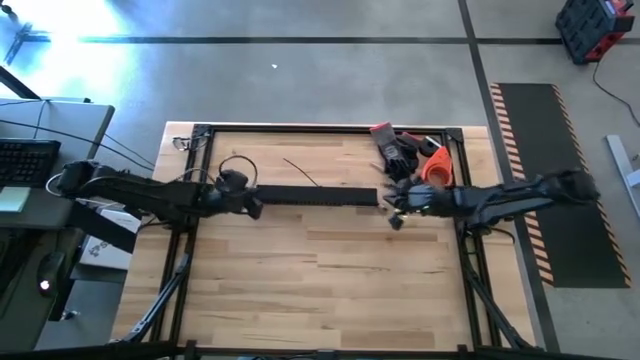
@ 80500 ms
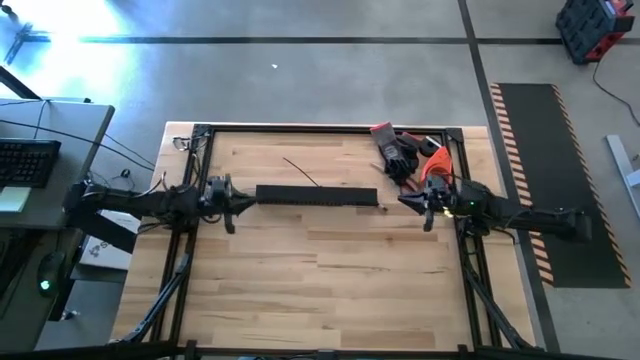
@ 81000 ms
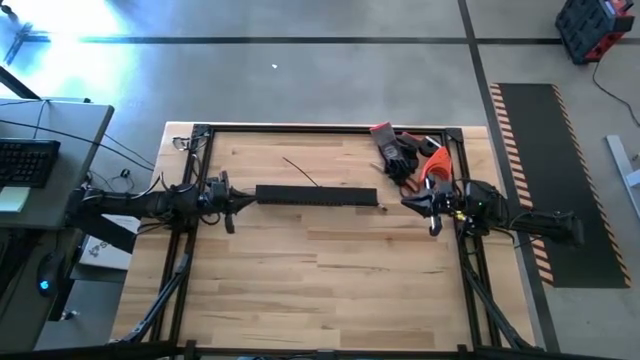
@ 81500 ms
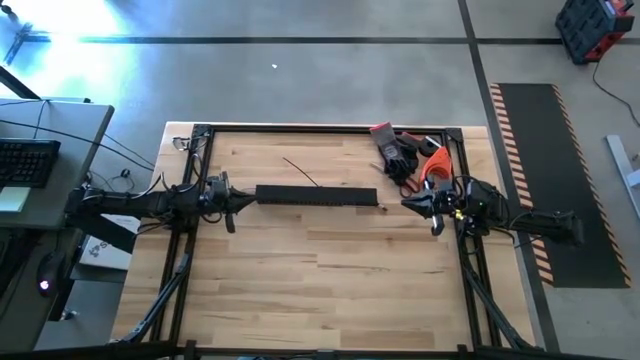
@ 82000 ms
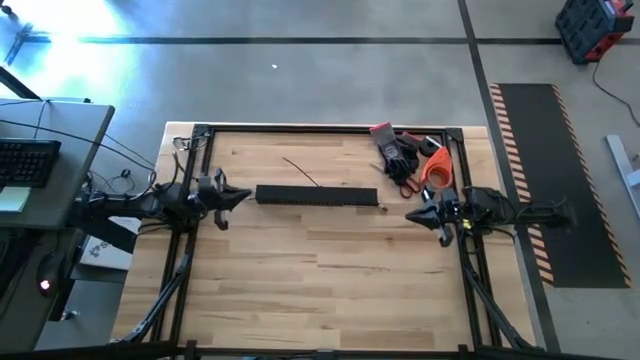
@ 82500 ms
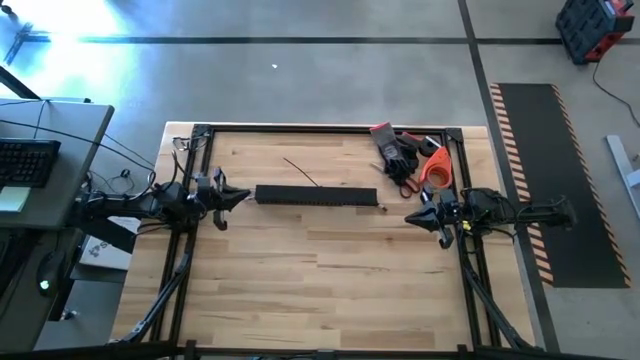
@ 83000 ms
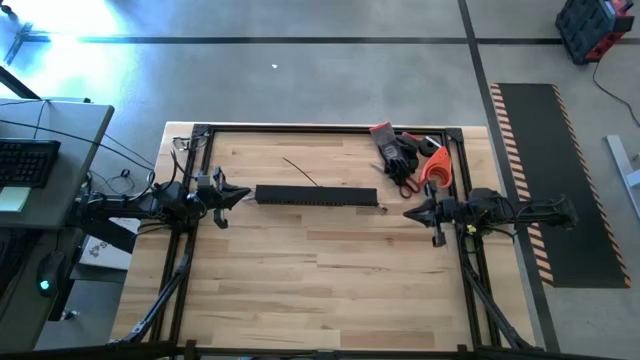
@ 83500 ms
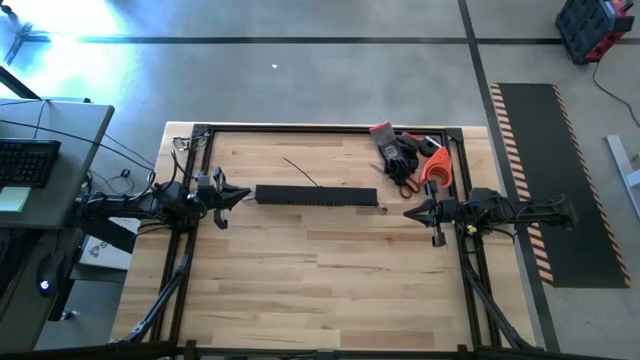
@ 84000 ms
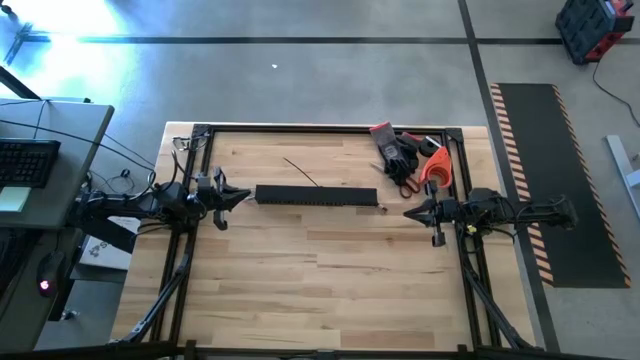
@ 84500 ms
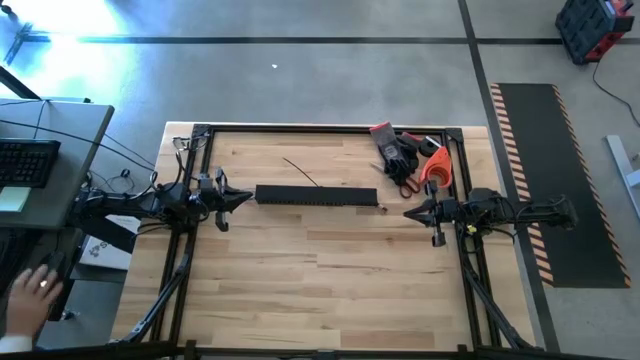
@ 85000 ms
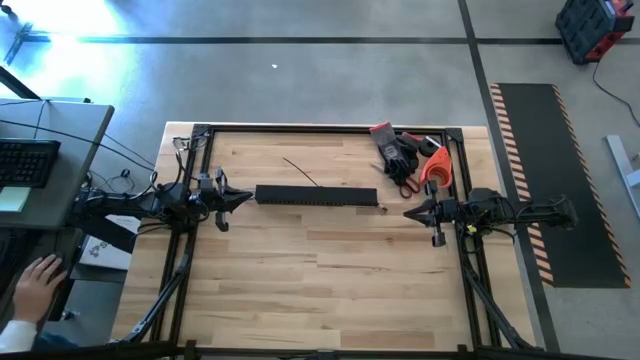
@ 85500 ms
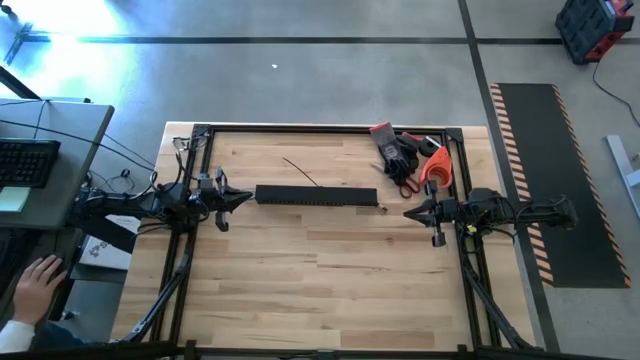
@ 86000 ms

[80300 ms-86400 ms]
Task: Ziptie cables
Return to Home Position

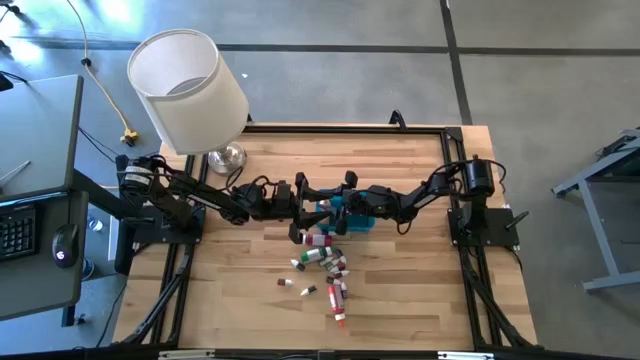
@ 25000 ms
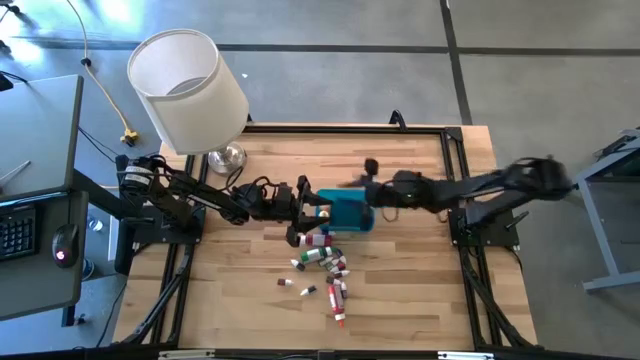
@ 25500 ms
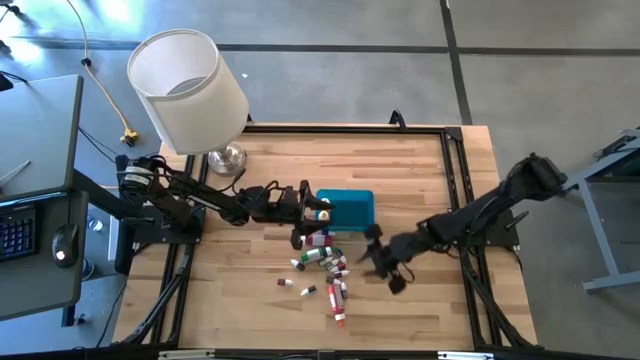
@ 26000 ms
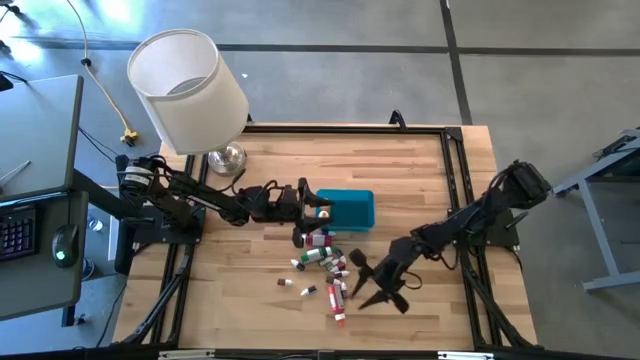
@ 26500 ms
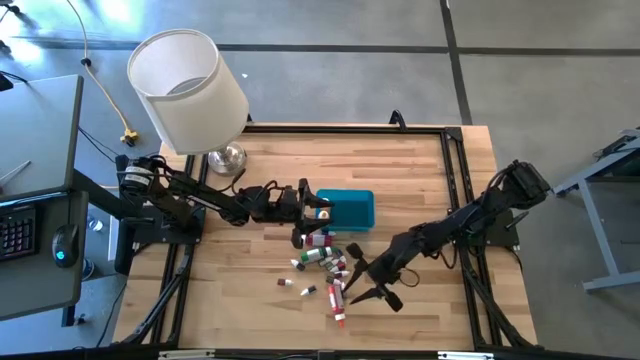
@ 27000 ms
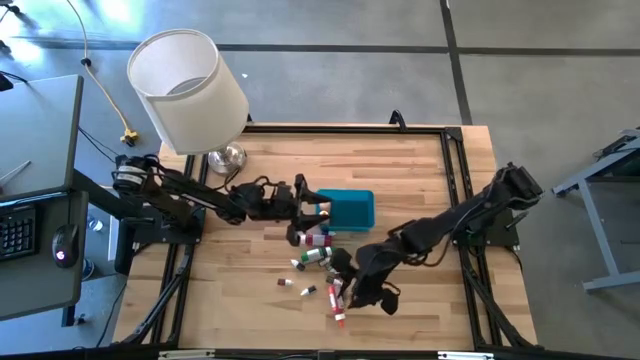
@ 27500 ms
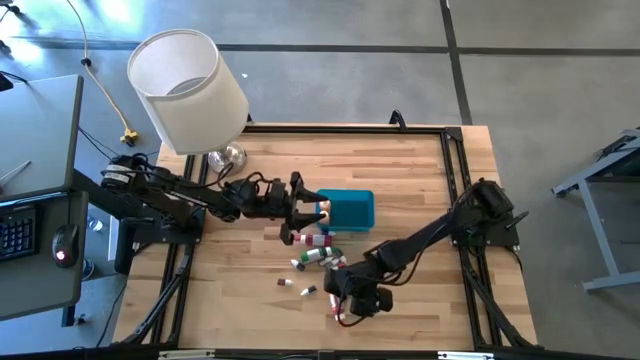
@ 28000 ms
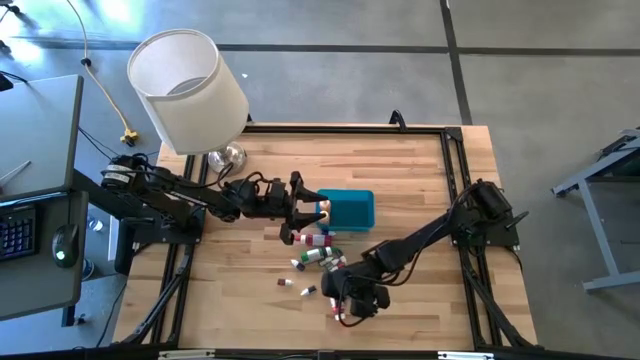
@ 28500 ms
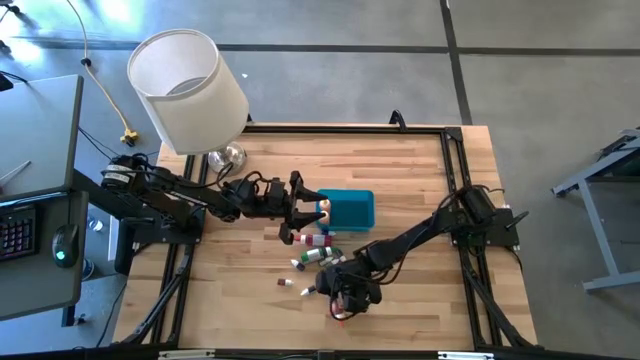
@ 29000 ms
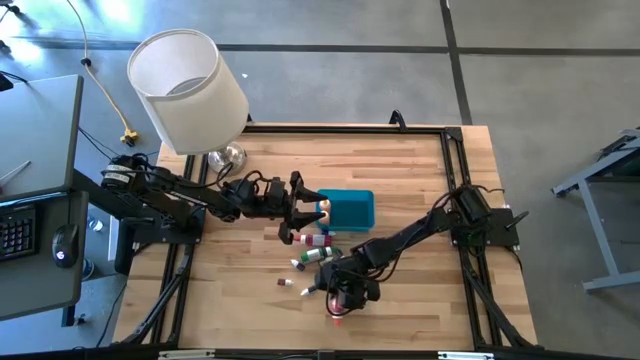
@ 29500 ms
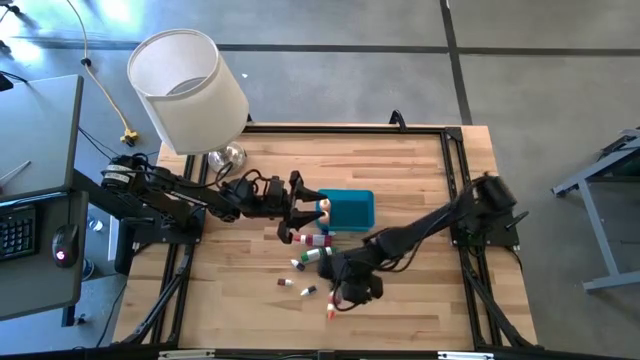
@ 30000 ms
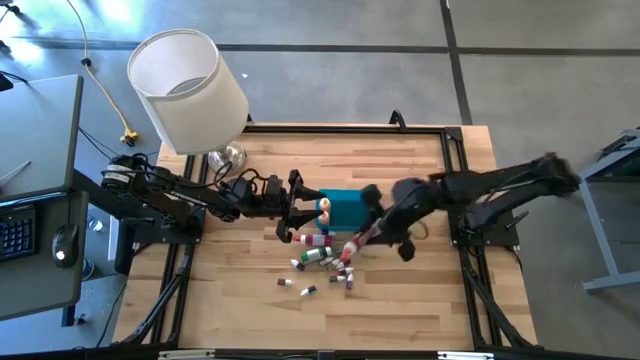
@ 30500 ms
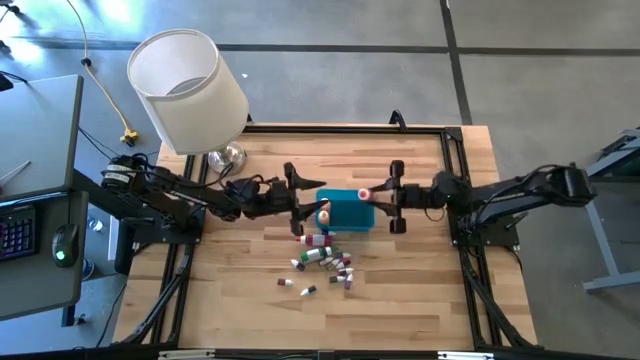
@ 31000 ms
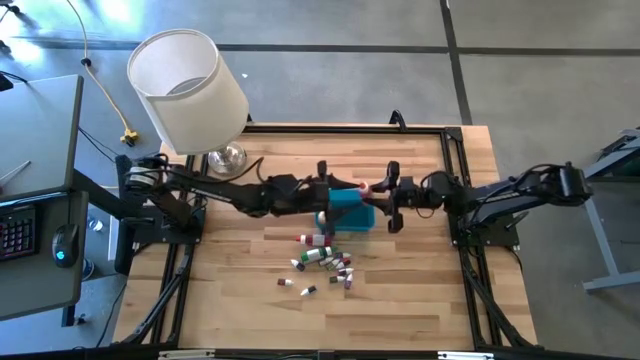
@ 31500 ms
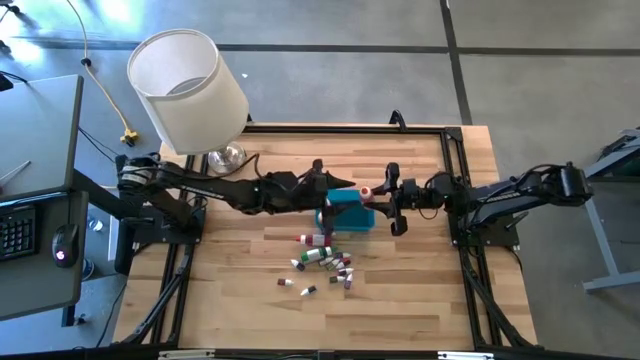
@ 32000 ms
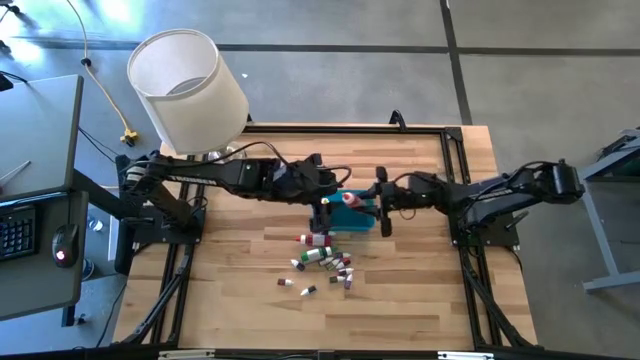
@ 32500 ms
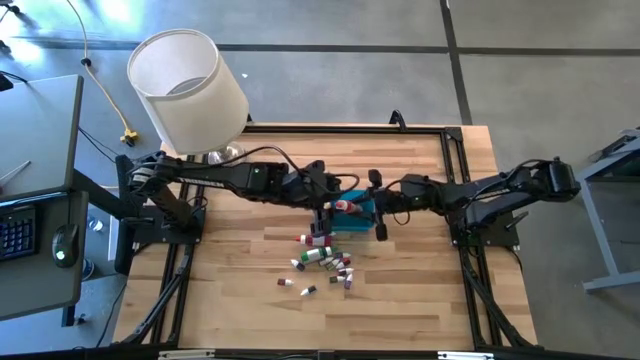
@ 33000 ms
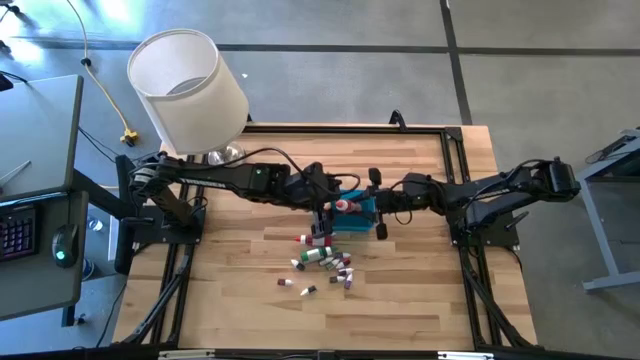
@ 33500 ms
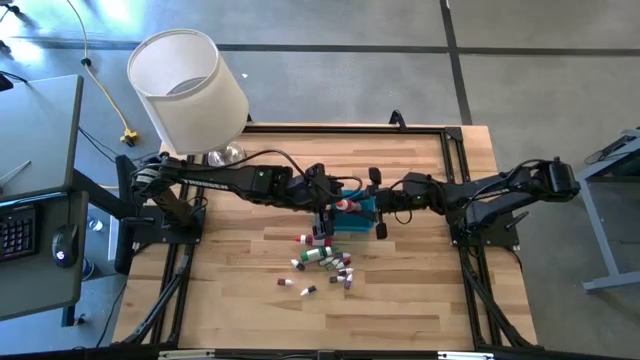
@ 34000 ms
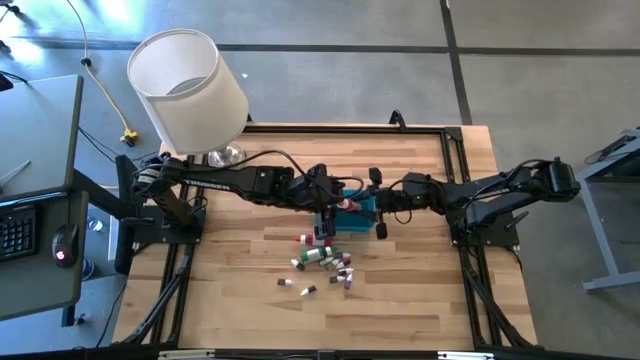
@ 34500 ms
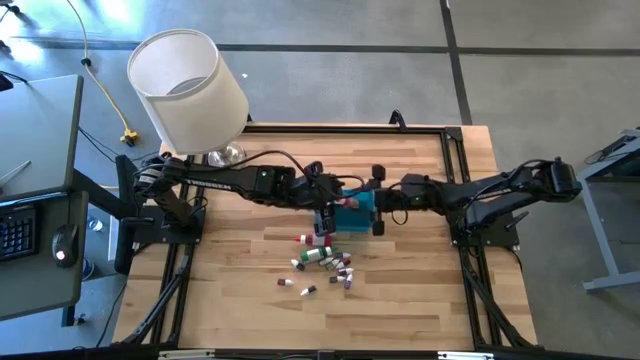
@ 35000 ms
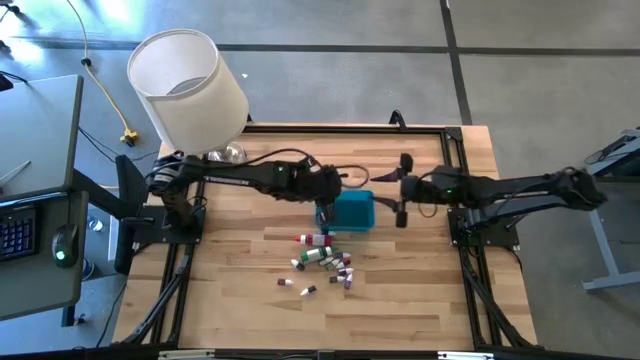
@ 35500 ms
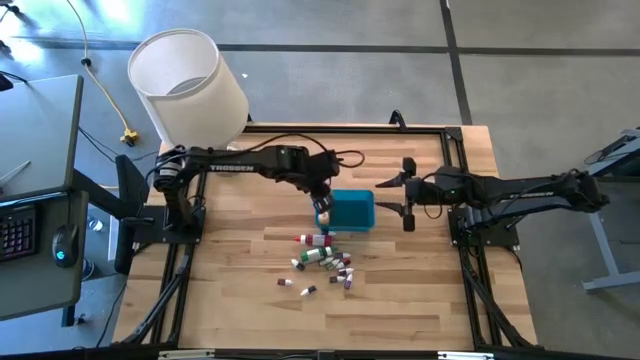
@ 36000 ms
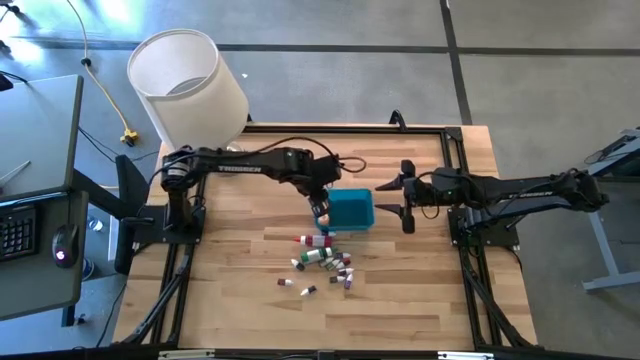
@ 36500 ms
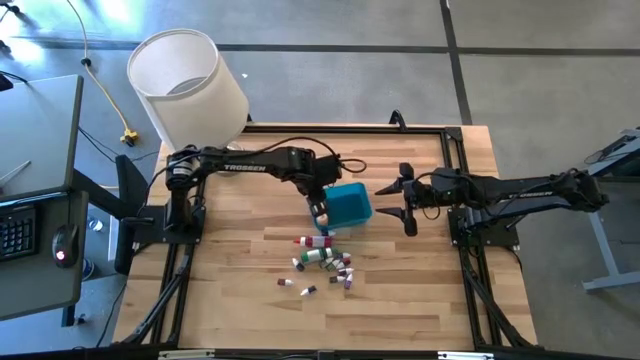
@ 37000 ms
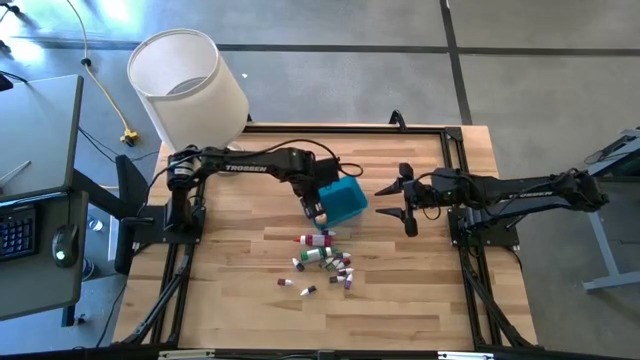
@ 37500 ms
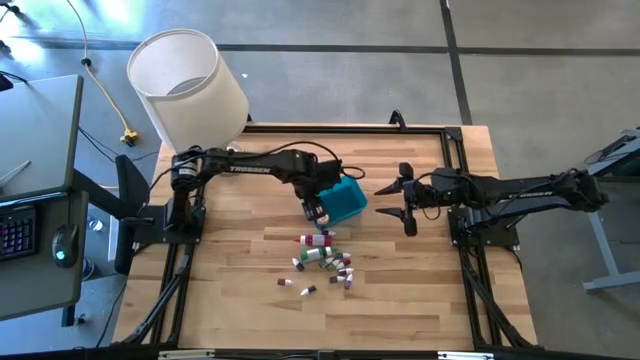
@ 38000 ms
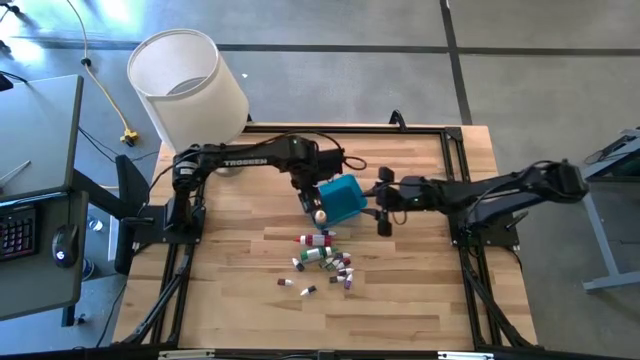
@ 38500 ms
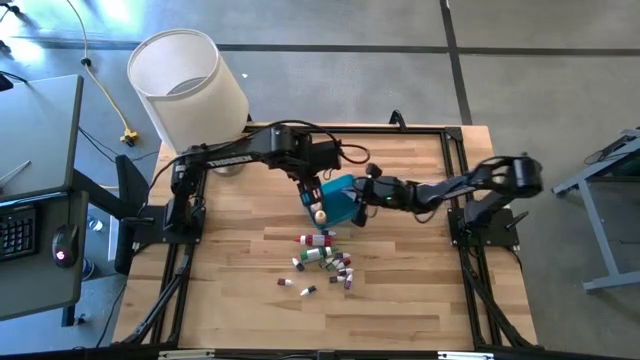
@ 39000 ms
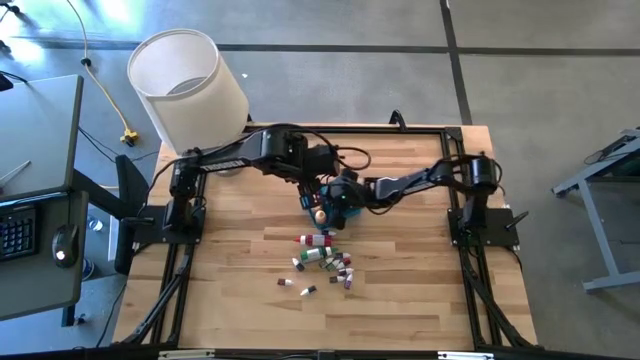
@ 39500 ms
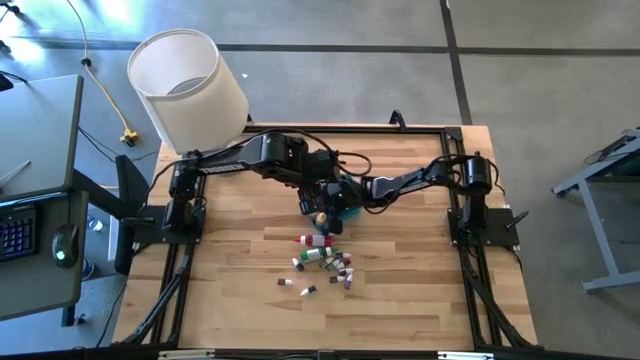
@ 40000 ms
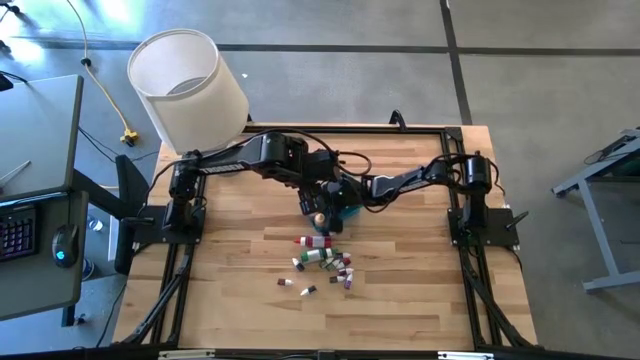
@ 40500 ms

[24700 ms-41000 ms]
Task: Pick & Place food coloring
Put the large orange food coloring bottle into the bin
